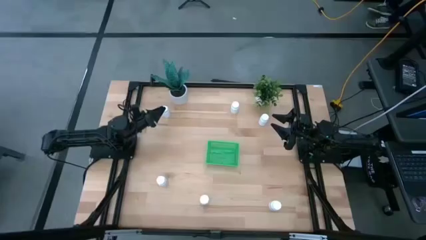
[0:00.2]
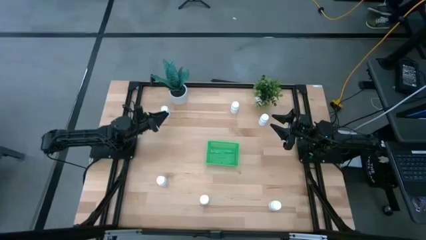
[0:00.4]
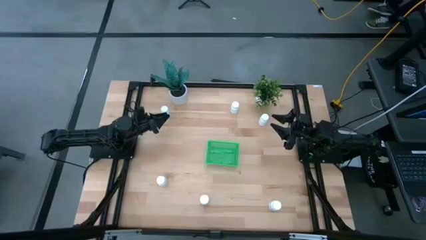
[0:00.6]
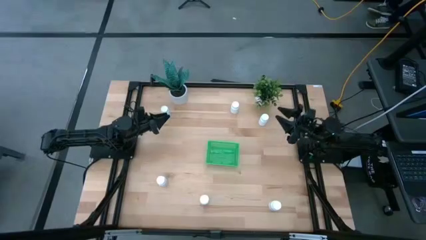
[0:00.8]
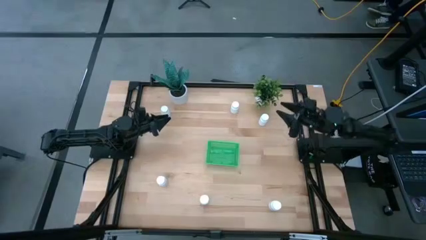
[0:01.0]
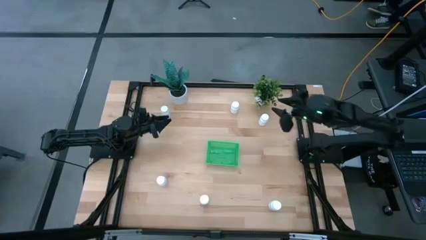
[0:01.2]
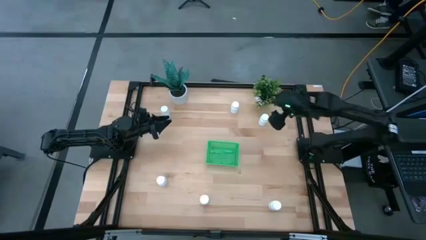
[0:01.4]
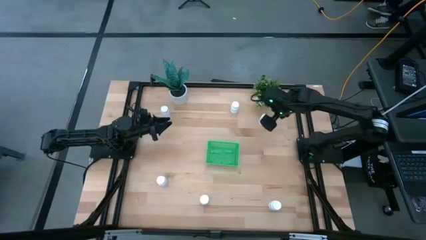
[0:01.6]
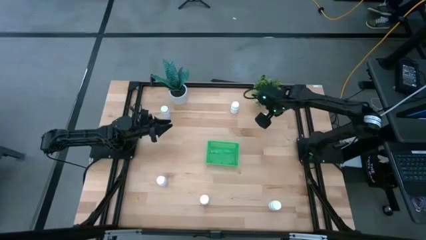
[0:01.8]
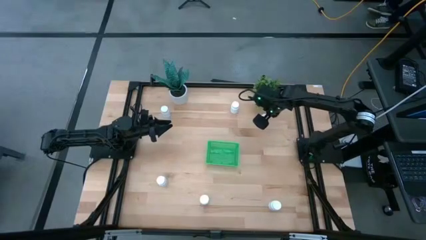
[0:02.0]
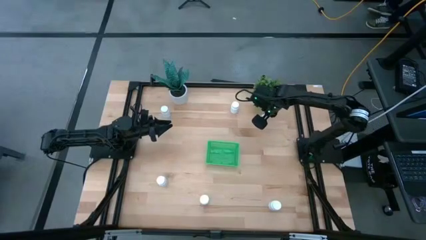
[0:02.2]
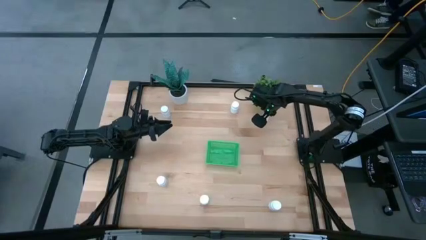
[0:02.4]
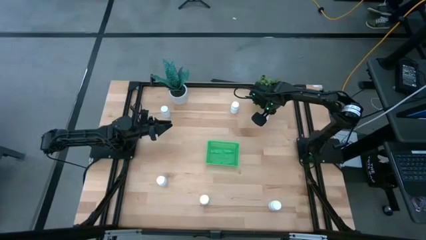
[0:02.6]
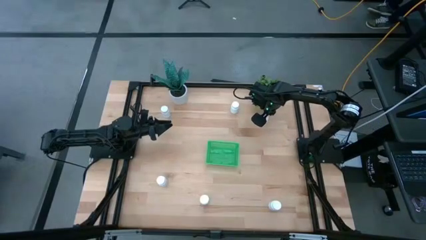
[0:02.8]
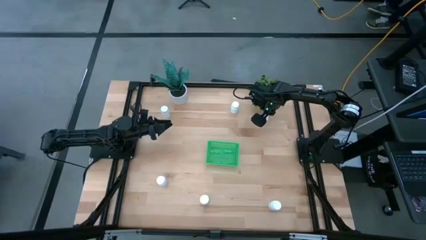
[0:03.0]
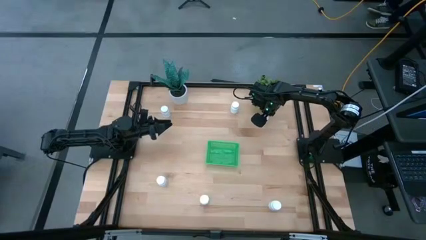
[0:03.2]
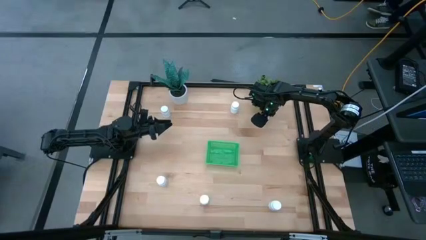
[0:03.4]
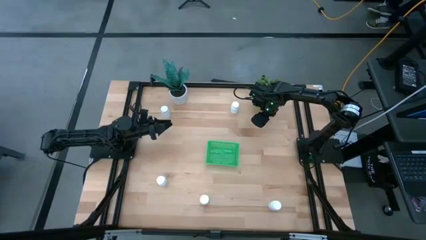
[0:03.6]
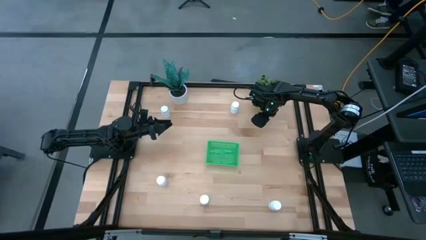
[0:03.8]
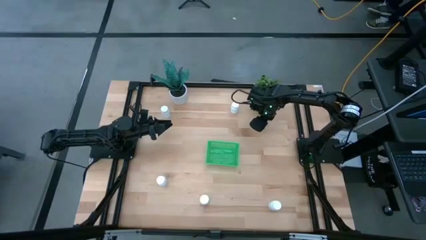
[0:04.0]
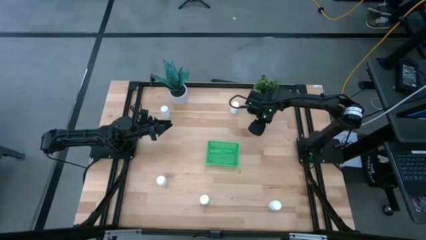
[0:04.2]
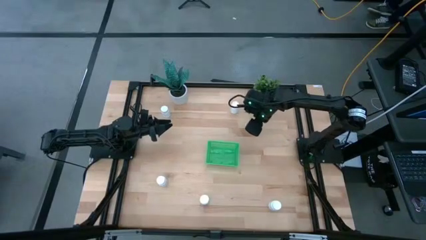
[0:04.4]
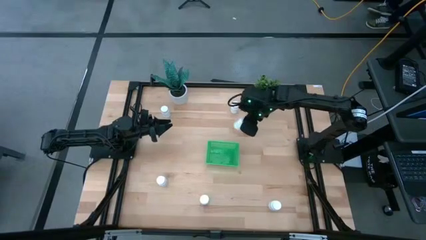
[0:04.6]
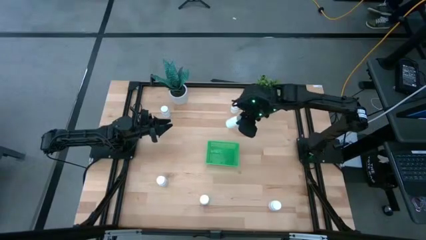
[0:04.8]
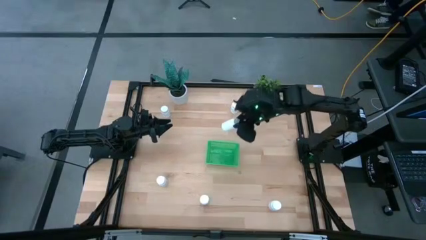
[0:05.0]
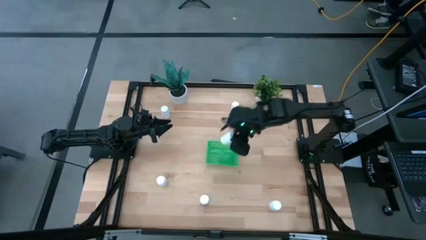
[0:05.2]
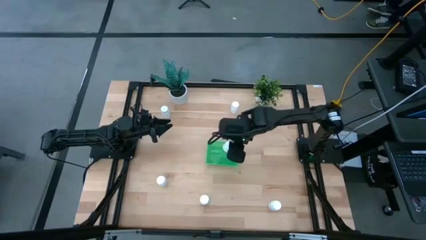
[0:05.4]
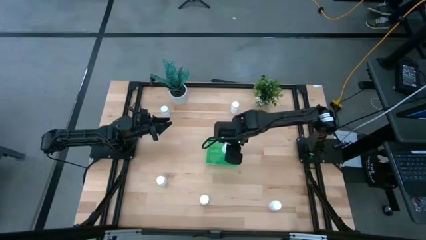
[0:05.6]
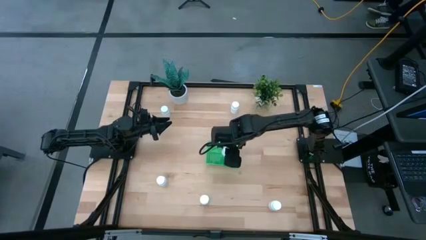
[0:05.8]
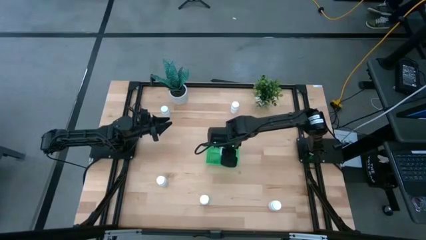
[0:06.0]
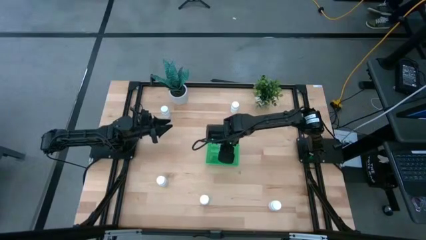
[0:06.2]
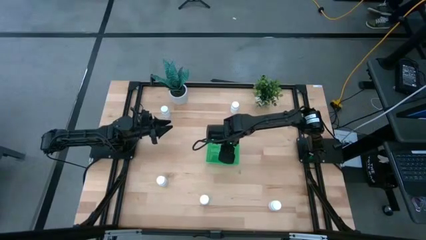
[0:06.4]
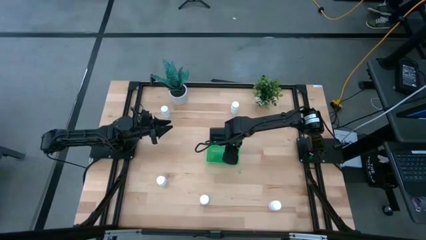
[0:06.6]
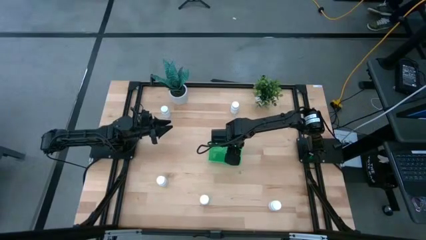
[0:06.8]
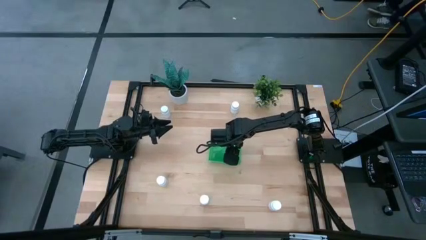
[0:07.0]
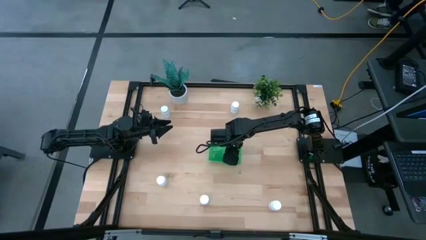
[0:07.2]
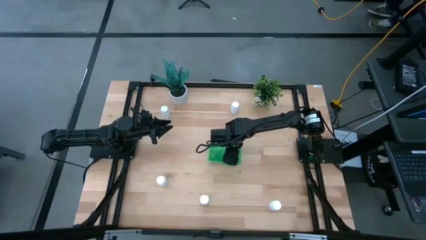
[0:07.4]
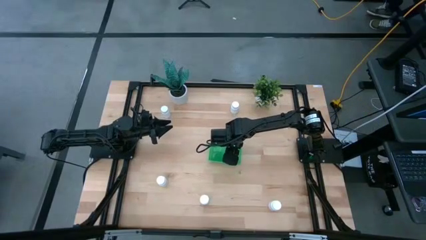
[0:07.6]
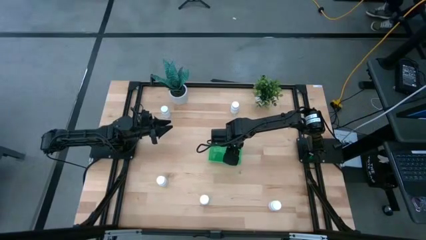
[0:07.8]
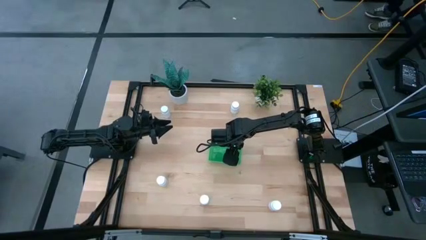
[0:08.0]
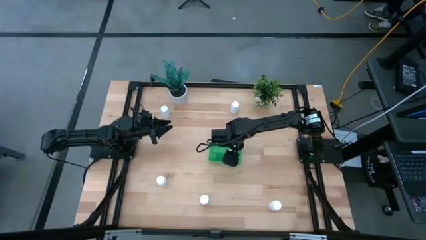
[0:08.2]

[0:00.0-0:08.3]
Task: Pick and place pill bottles into a basket
Put the top right medicine bottle into the green basket

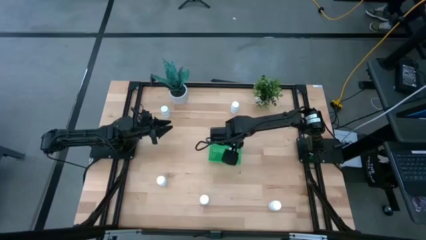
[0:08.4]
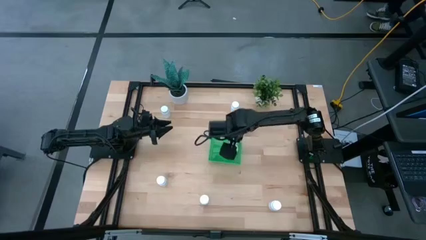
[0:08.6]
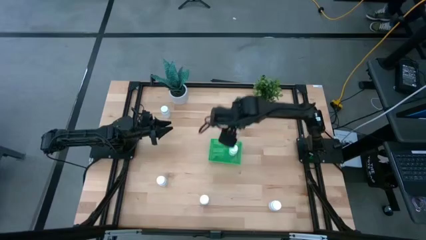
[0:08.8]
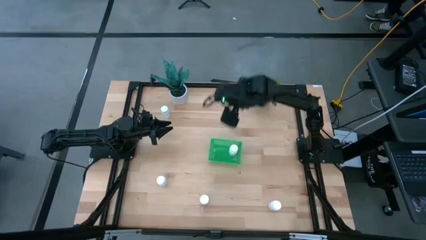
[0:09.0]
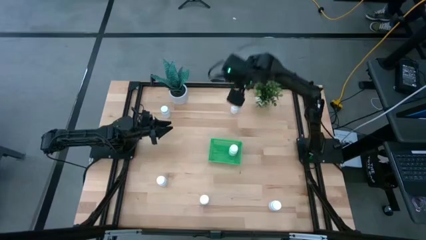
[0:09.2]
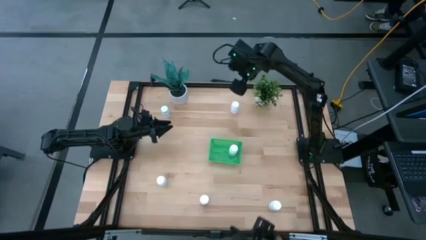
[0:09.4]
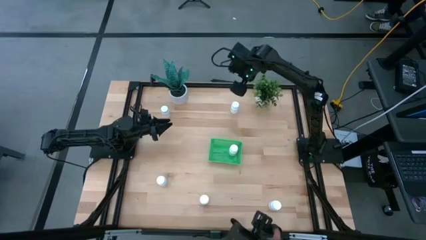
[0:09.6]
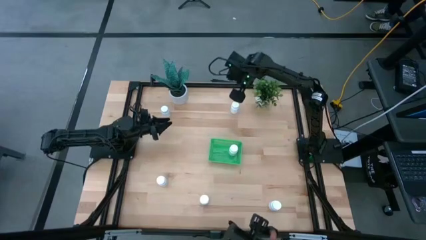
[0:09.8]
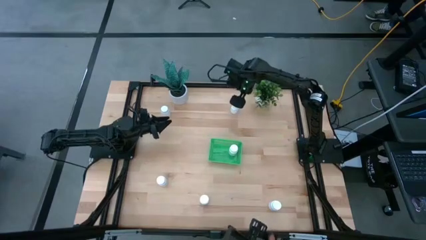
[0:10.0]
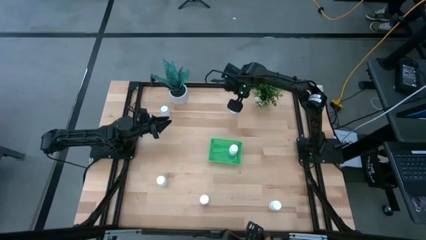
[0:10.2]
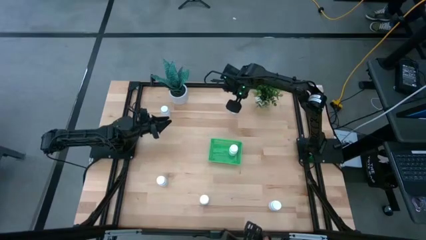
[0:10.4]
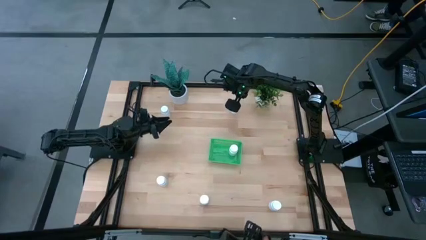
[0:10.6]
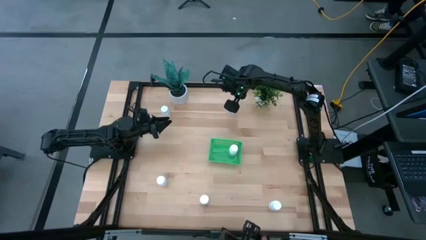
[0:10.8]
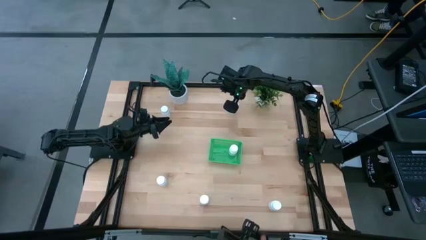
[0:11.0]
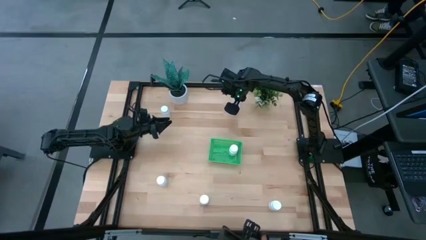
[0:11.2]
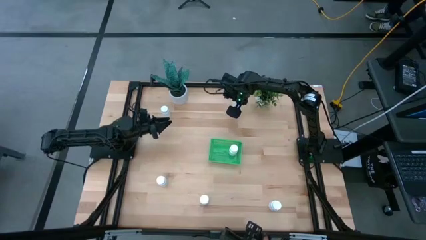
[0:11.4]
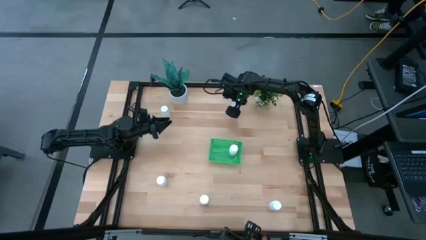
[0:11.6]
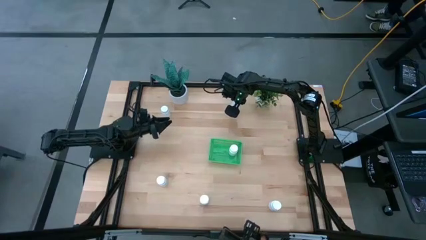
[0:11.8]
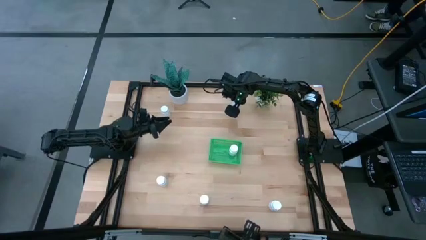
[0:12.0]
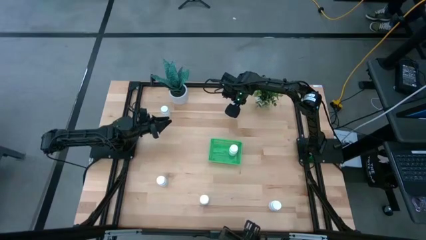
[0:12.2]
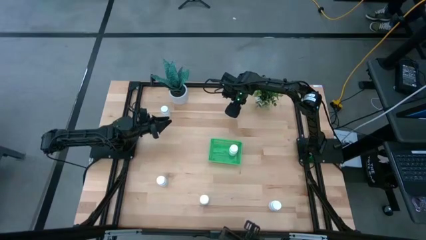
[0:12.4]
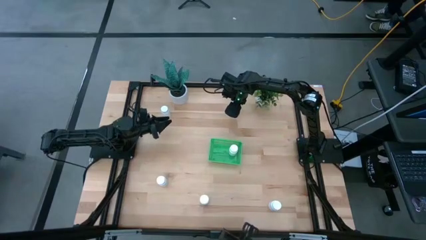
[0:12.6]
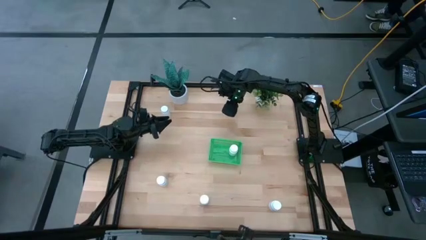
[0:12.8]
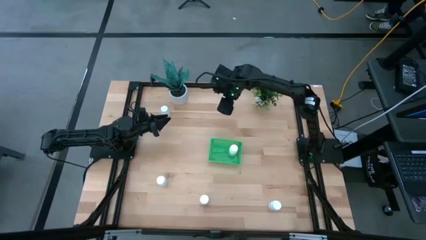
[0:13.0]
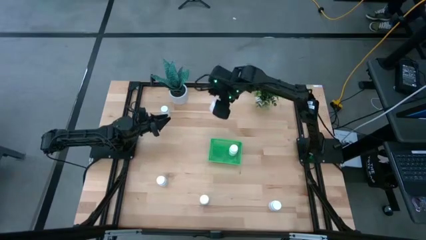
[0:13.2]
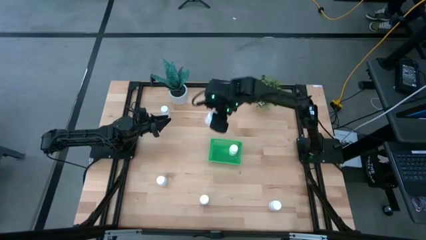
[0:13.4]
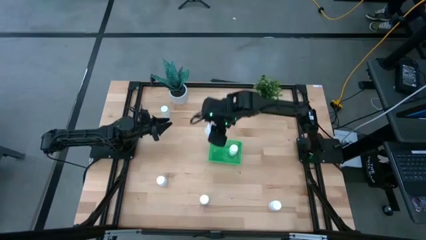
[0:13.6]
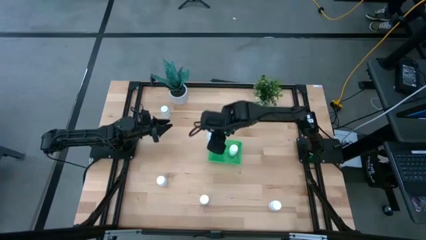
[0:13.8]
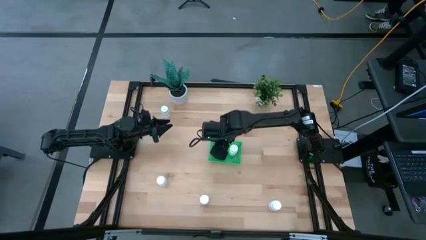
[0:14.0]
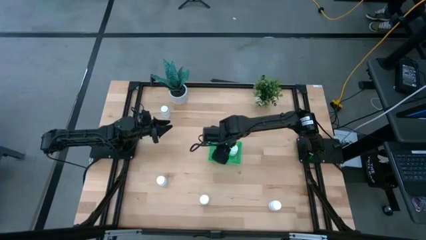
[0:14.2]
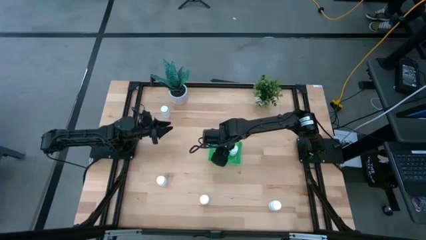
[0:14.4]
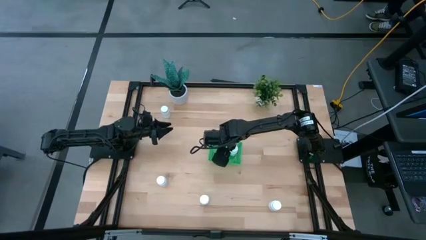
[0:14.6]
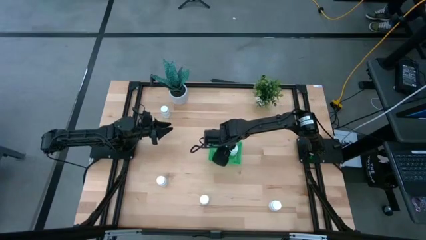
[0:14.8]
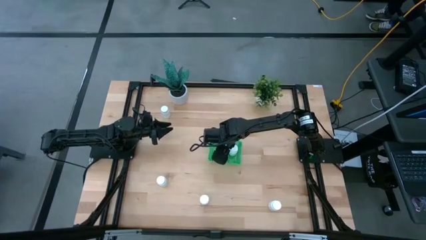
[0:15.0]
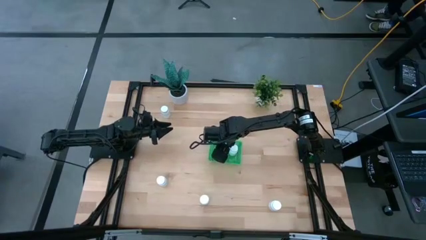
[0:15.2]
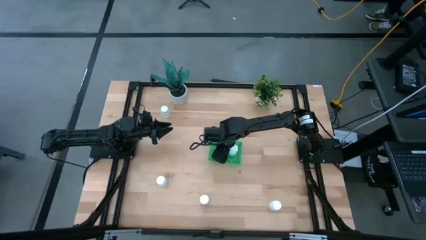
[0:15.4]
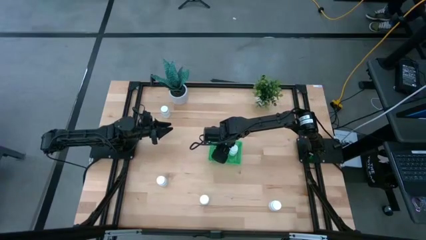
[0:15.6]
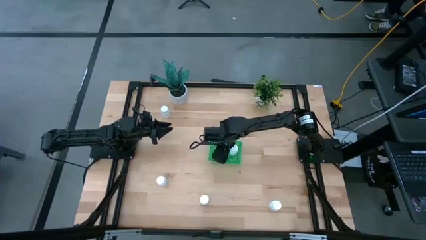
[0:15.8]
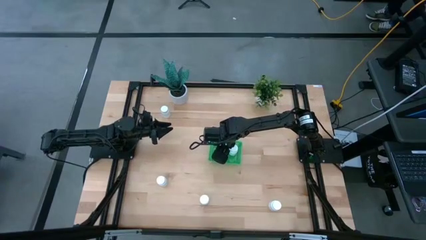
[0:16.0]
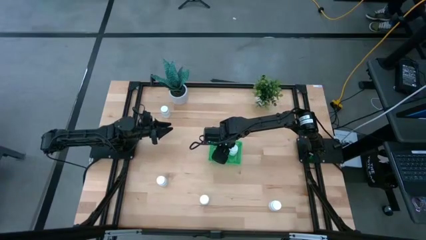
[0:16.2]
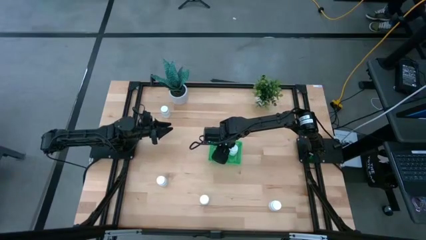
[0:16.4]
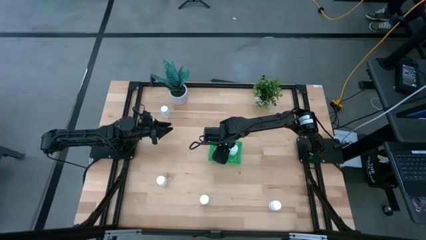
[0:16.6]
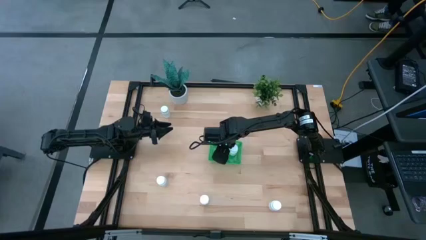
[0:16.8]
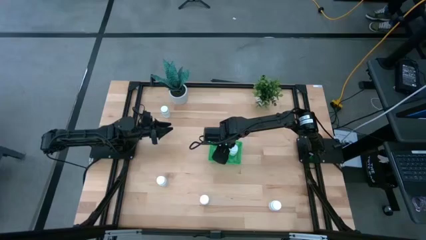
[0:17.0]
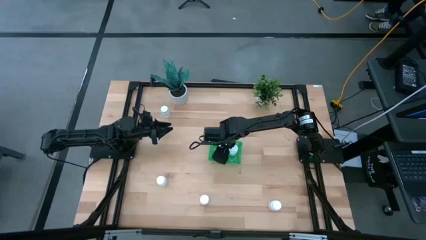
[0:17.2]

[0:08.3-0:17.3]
Put the top right medicine bottle into the green basket
